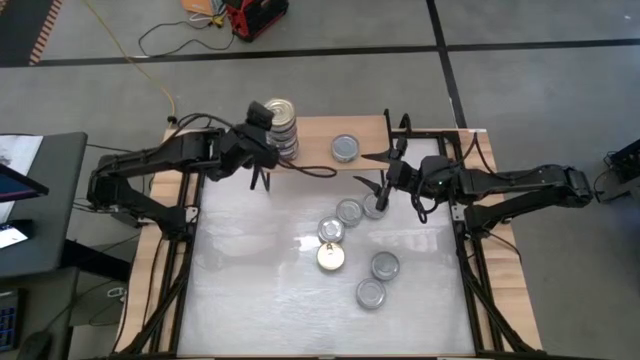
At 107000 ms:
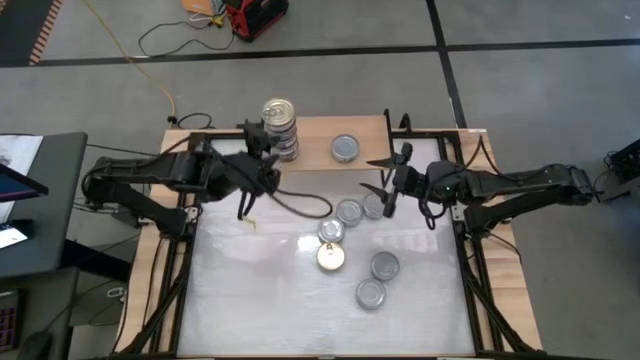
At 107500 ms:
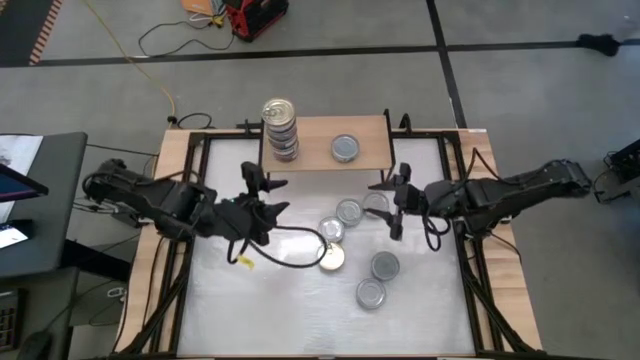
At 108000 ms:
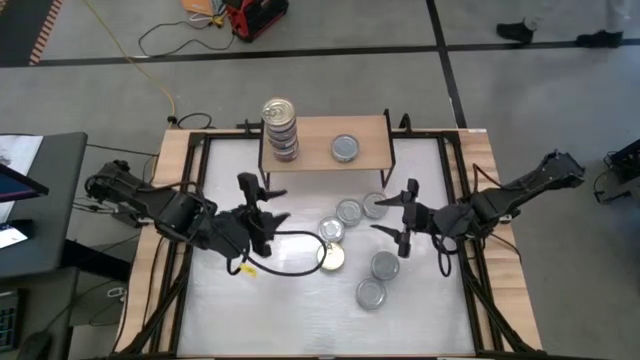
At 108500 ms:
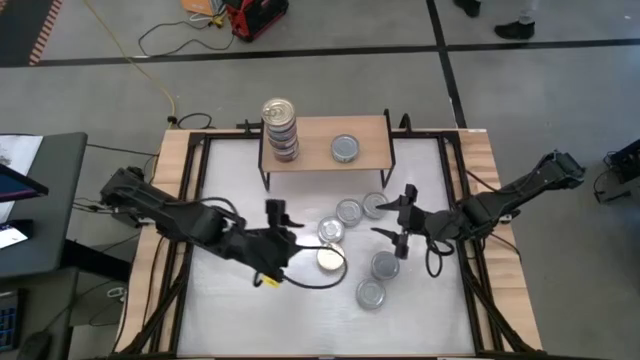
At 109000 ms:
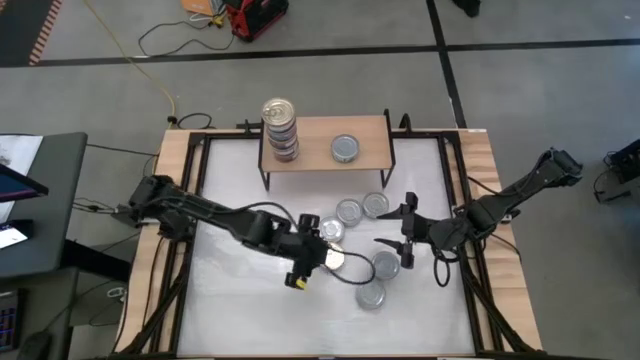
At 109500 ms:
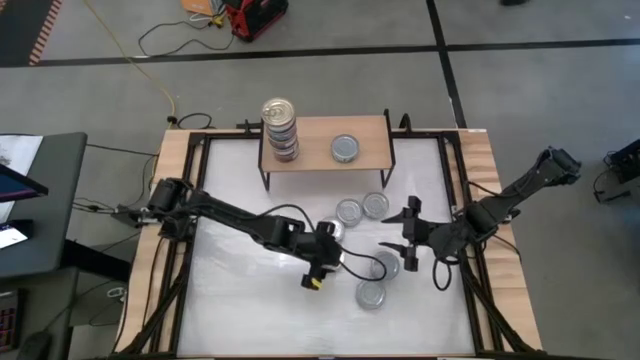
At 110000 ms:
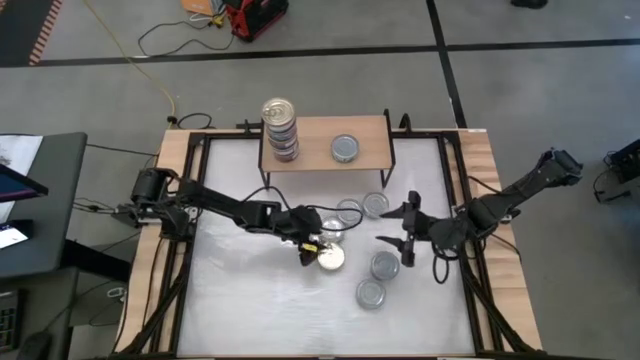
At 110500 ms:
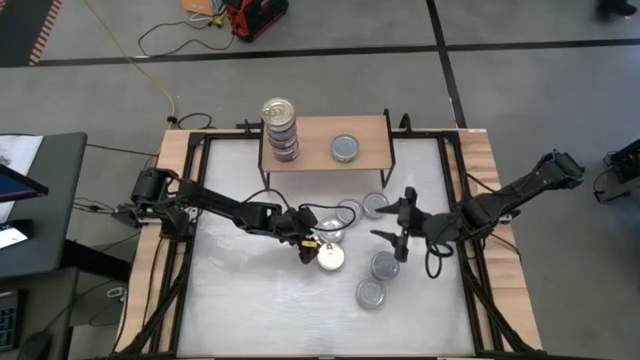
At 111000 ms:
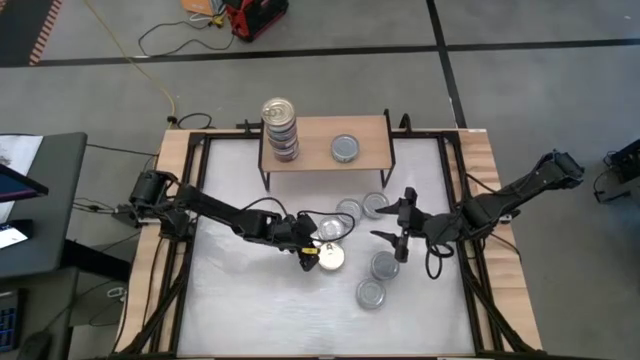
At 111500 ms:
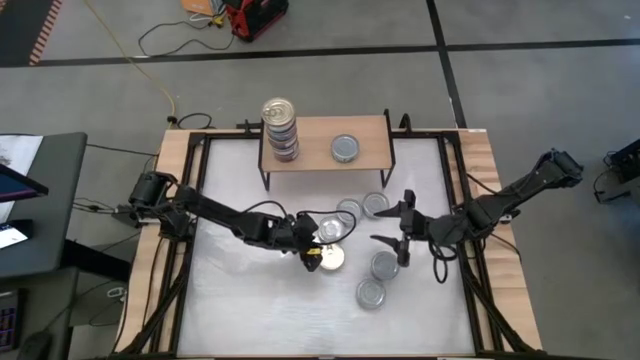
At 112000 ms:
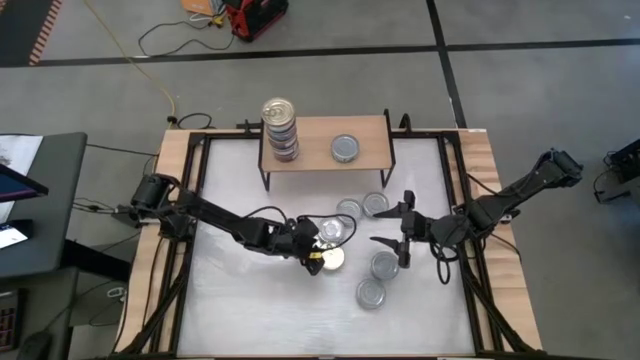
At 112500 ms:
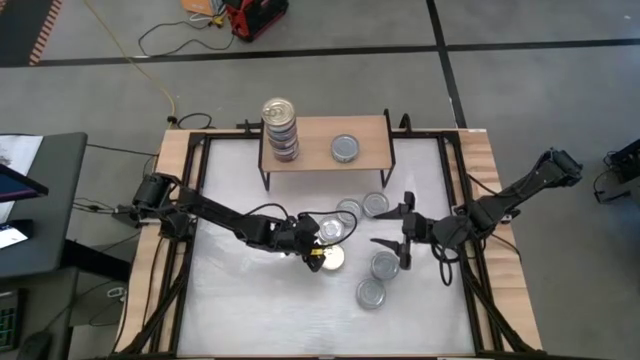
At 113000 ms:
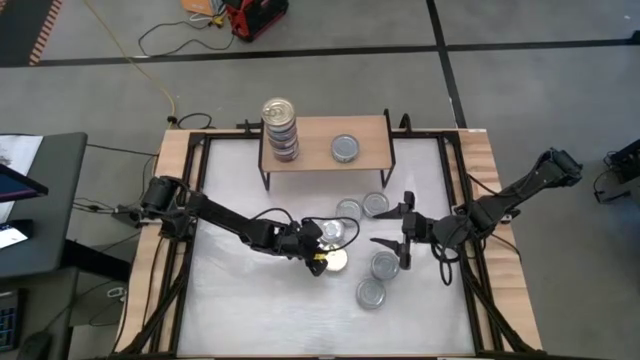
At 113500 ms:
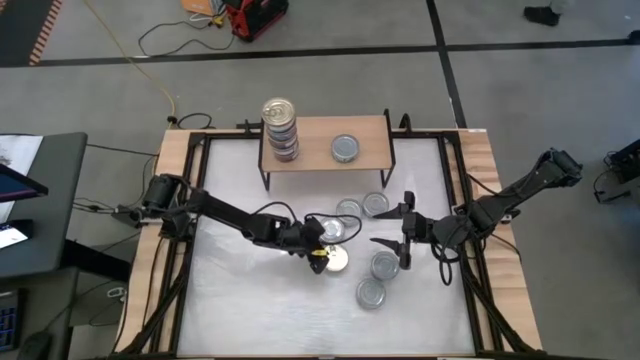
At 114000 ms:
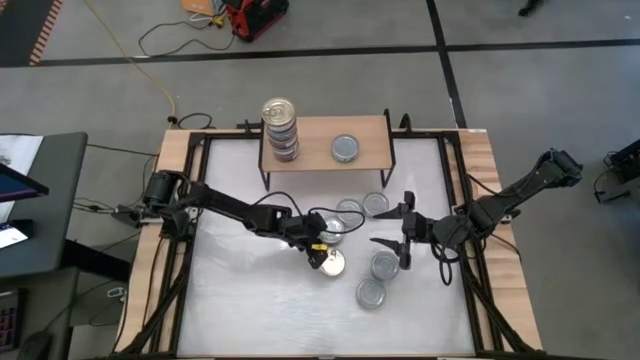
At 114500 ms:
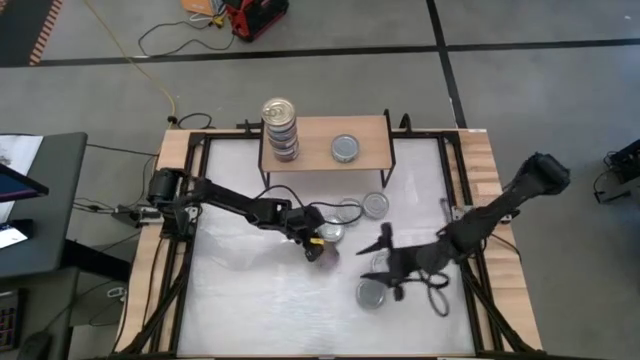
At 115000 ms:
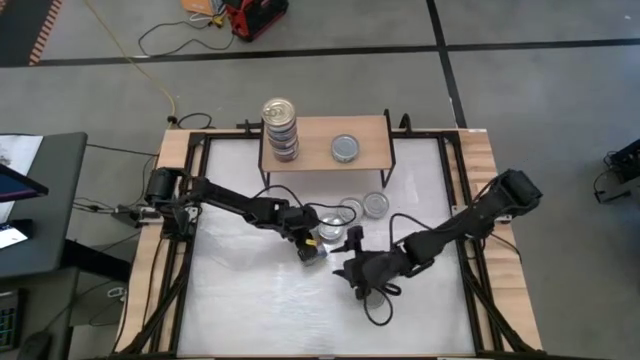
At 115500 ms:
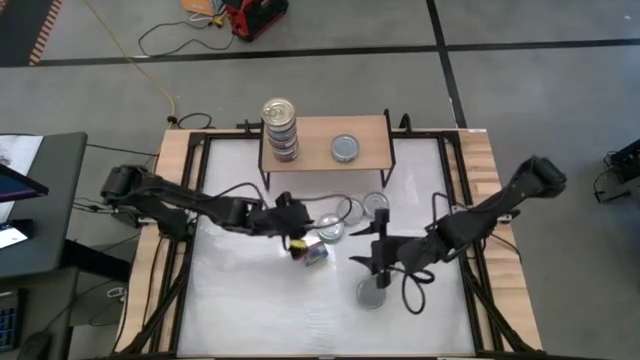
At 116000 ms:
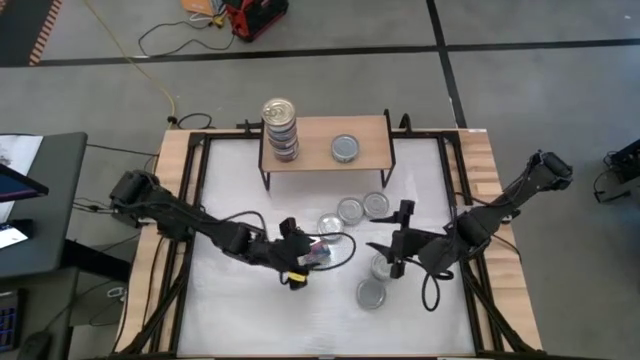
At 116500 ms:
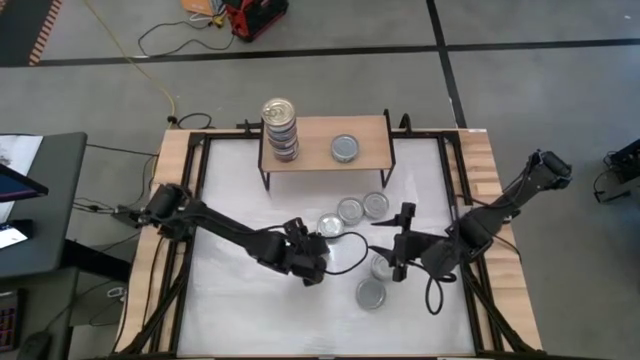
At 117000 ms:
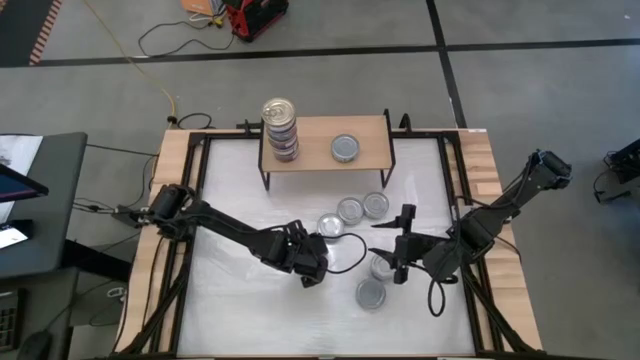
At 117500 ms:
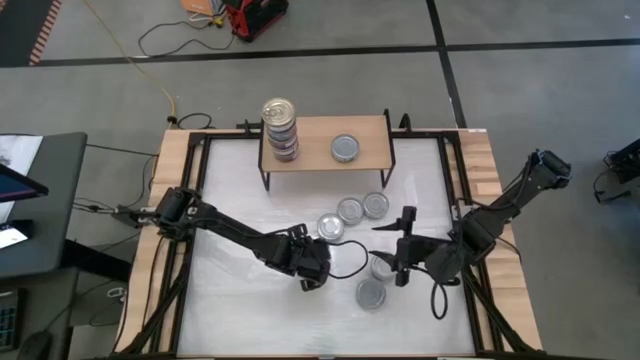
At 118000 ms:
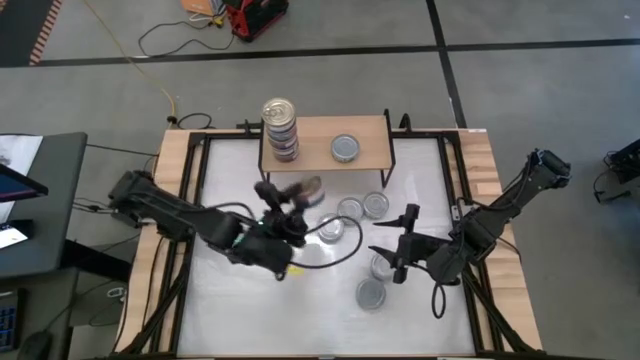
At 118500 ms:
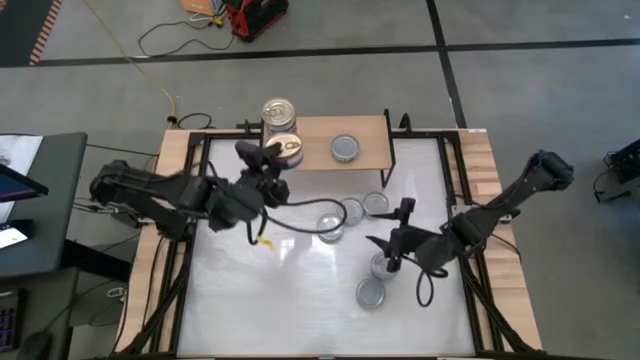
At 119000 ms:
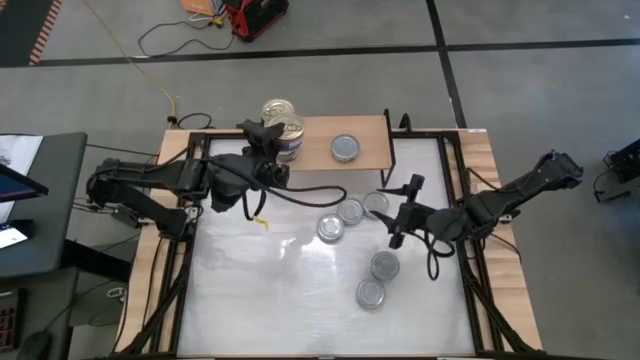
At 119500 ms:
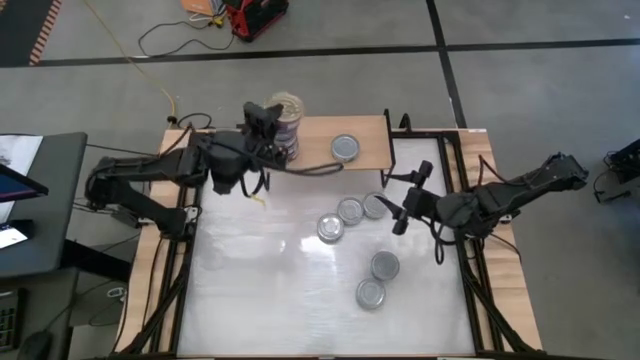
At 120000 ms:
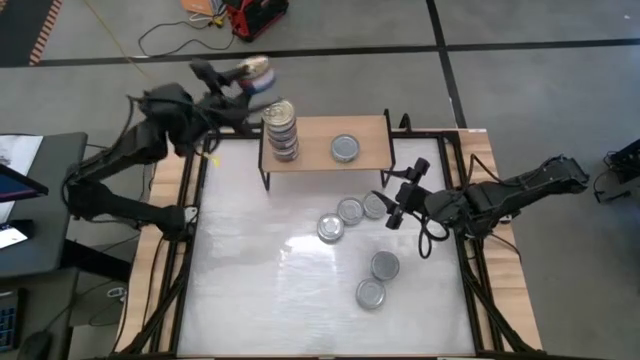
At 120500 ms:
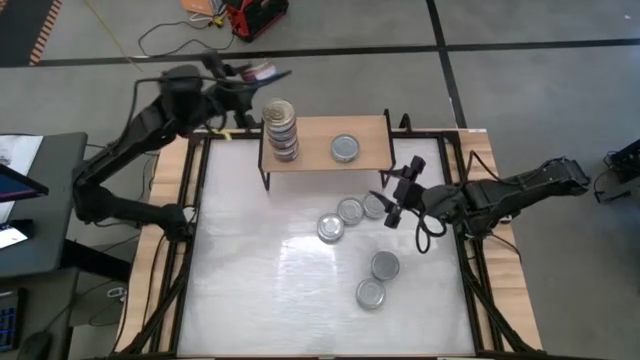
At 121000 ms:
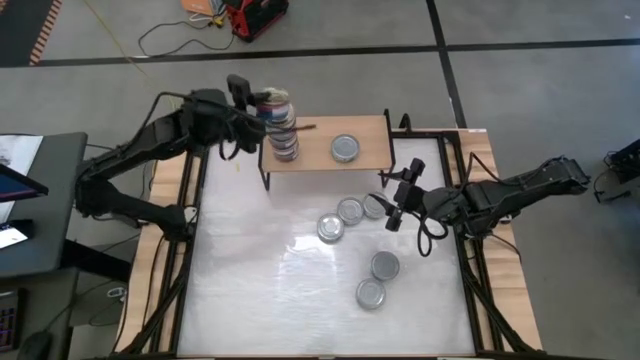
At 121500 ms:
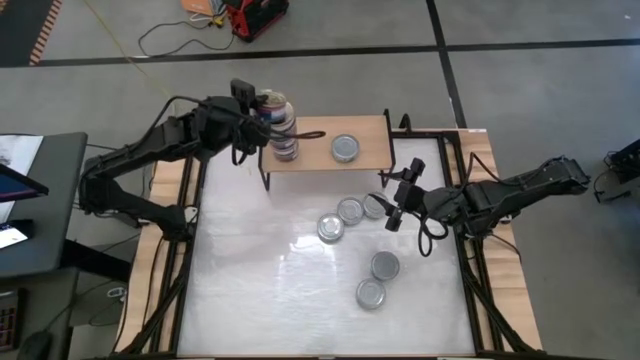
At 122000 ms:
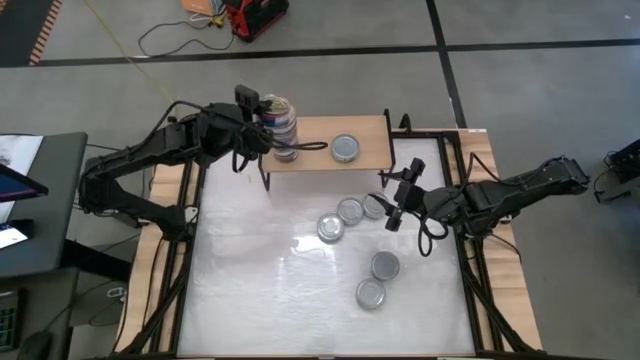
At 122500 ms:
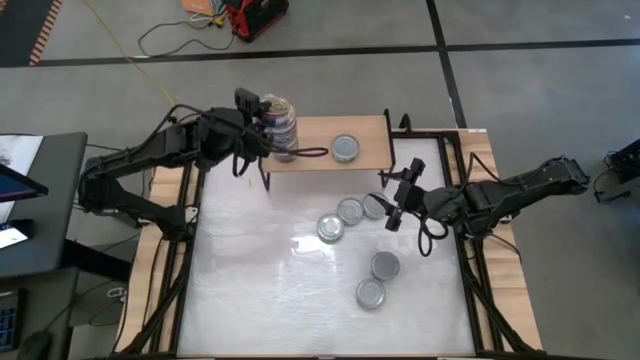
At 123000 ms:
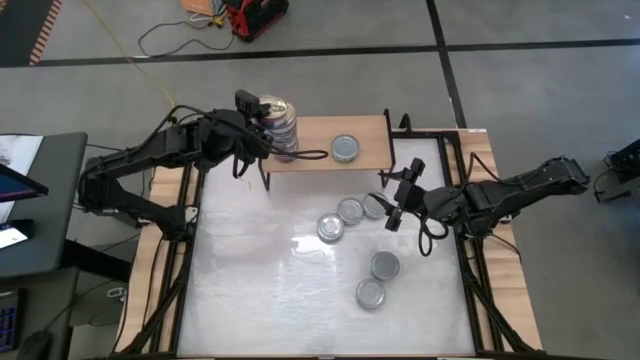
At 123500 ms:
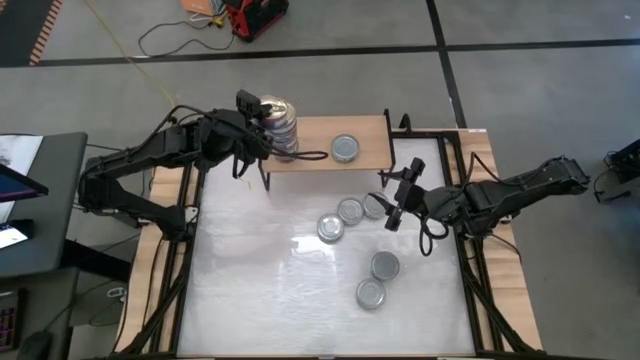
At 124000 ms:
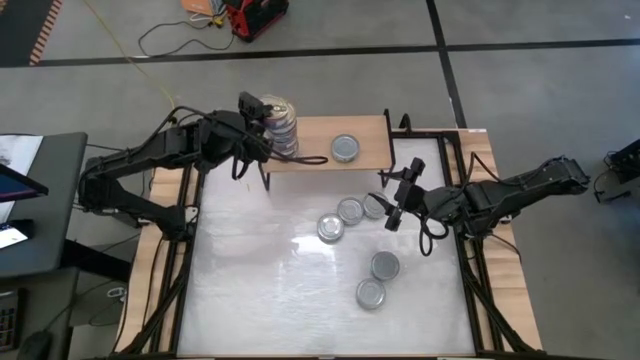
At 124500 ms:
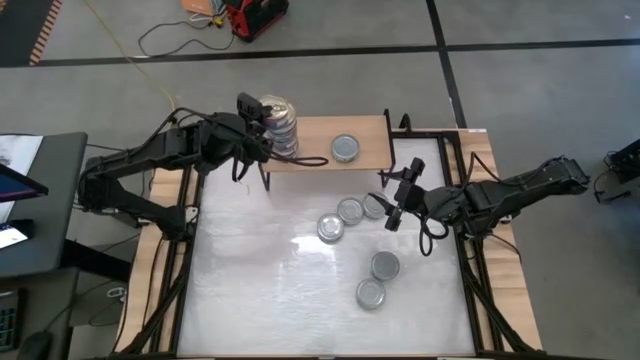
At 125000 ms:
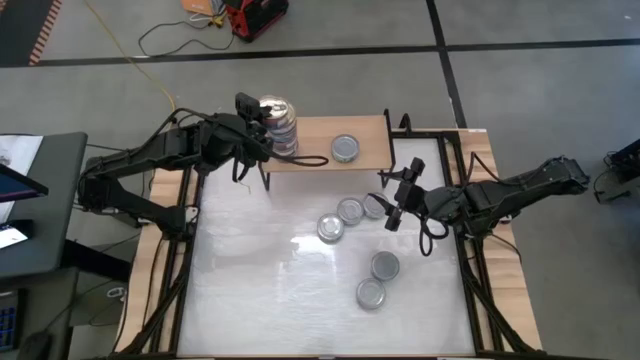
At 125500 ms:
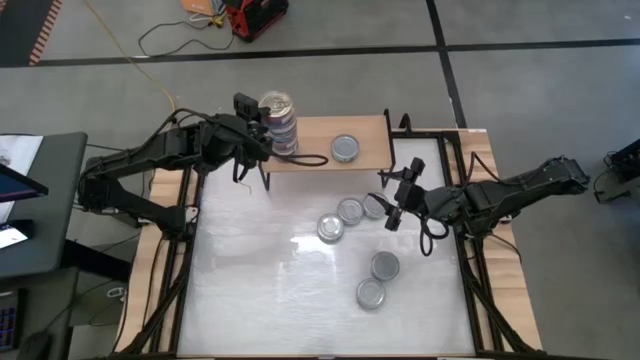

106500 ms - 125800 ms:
Task: Stack canned seafood by type on shelf
Stack the blue tuna can on top of the blue tuna can

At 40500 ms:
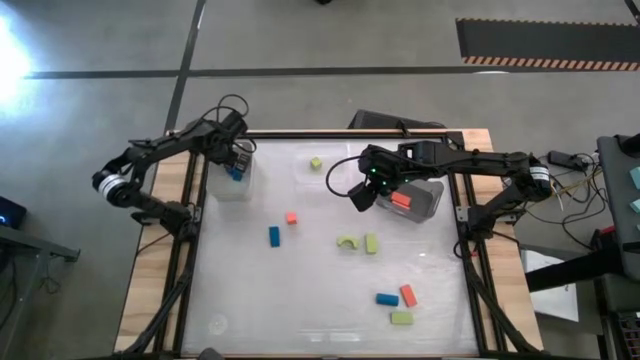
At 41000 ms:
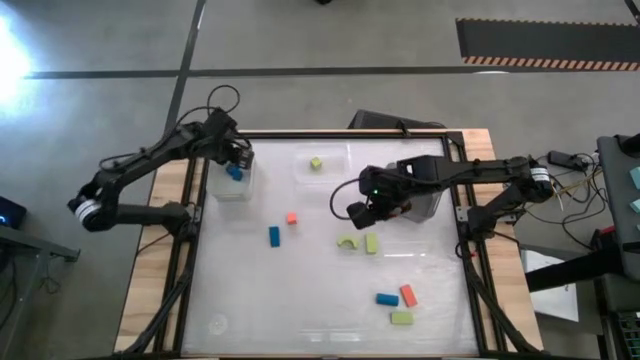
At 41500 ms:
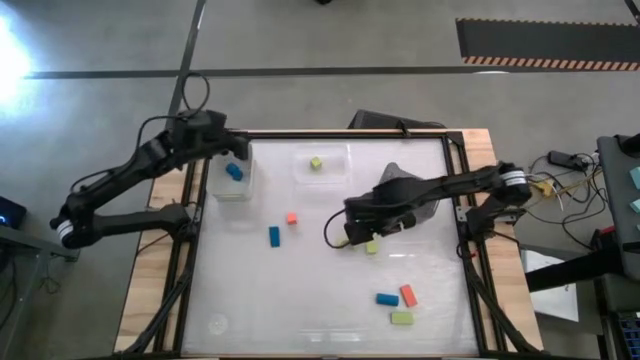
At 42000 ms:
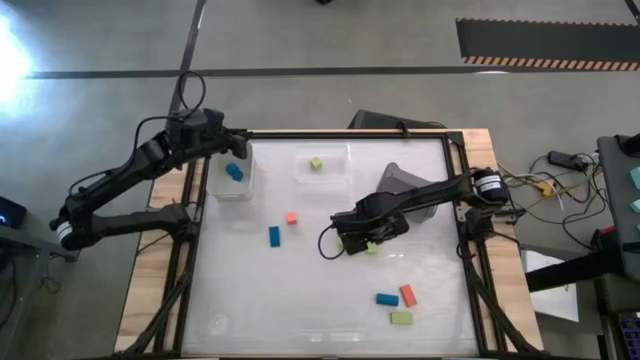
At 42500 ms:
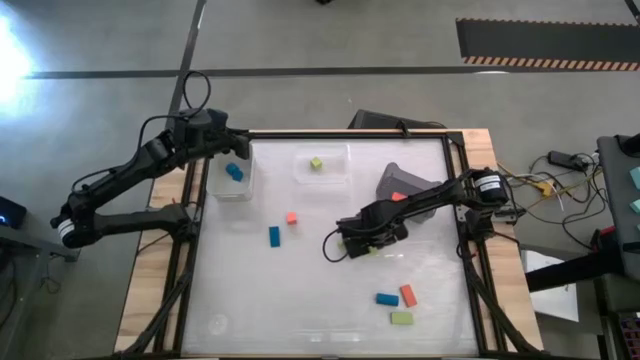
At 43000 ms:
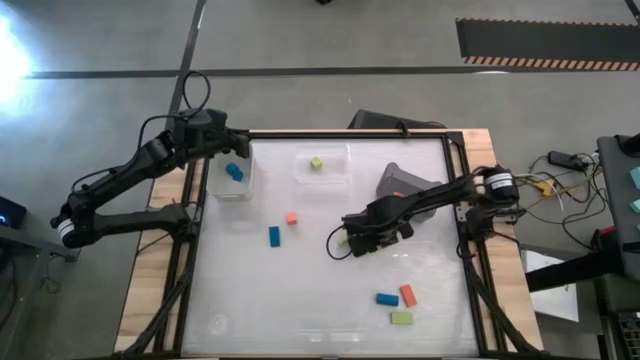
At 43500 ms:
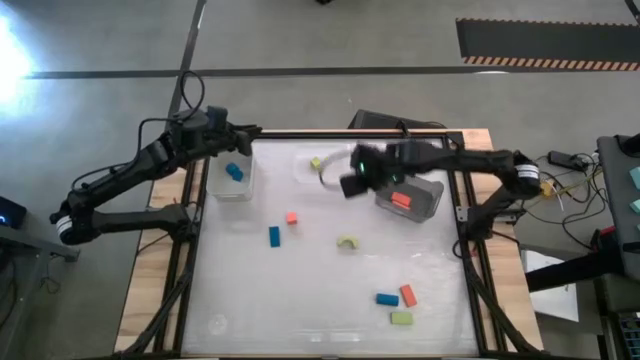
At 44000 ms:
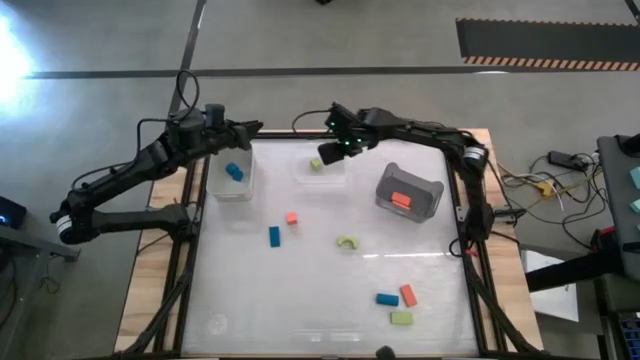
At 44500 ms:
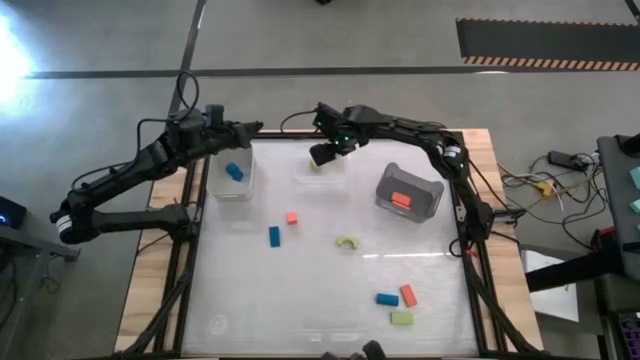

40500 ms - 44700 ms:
Task: Sort & place blocks by color
Put the green block into the transparent bin
